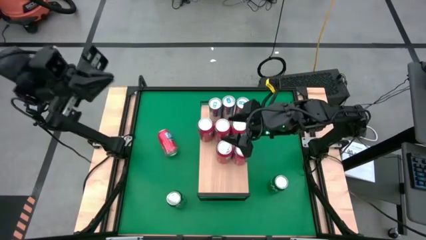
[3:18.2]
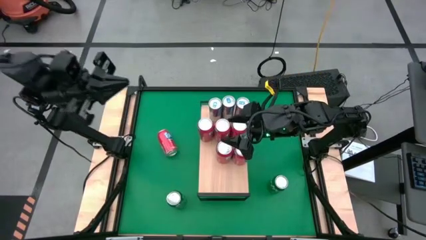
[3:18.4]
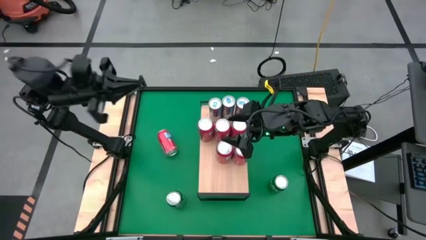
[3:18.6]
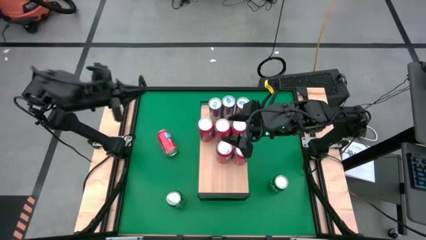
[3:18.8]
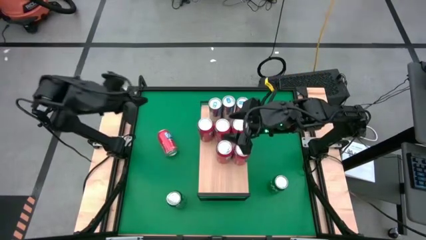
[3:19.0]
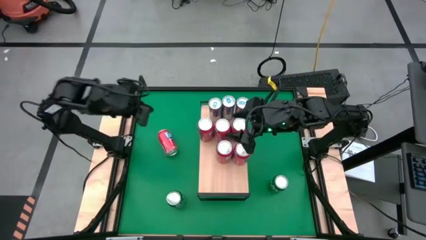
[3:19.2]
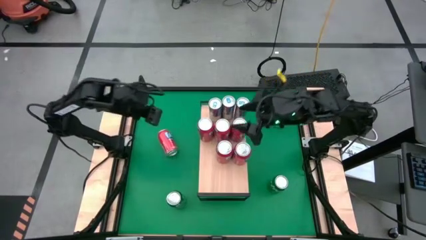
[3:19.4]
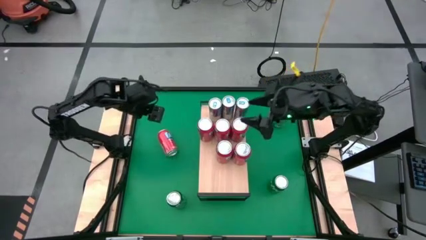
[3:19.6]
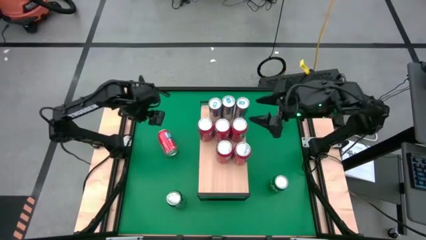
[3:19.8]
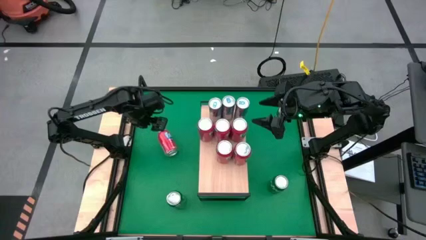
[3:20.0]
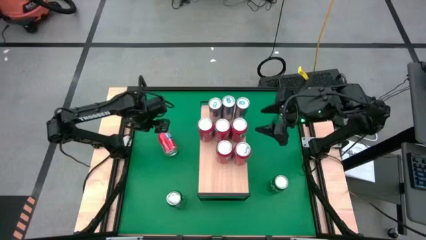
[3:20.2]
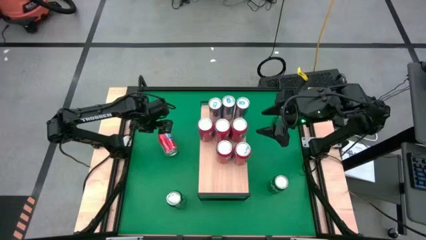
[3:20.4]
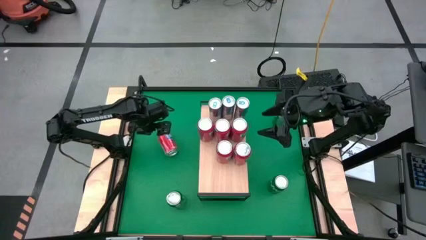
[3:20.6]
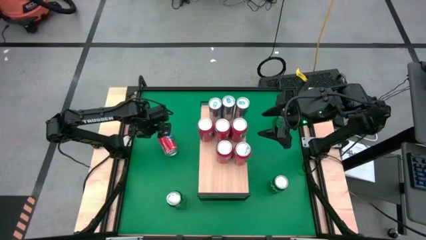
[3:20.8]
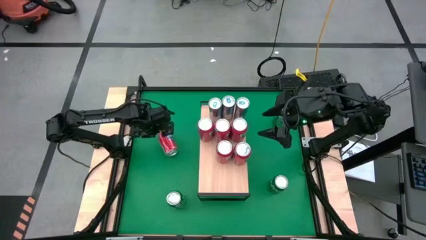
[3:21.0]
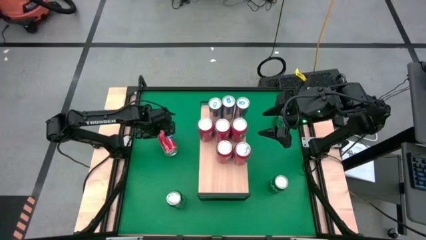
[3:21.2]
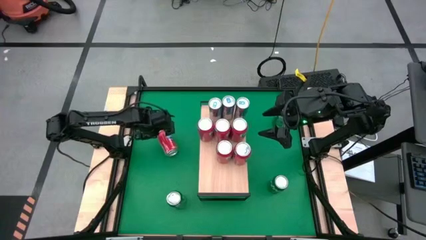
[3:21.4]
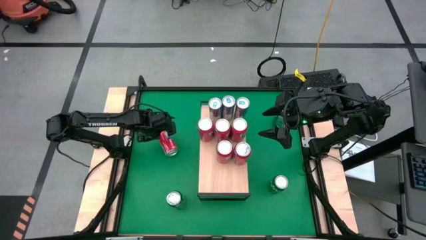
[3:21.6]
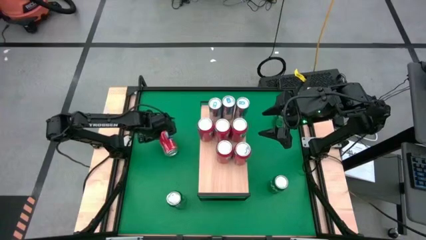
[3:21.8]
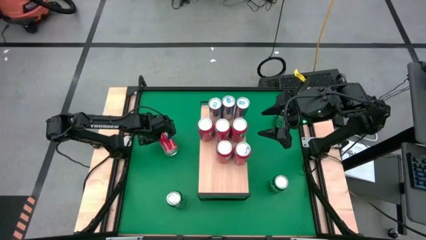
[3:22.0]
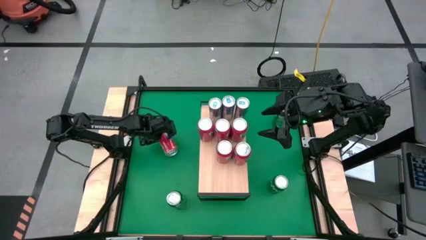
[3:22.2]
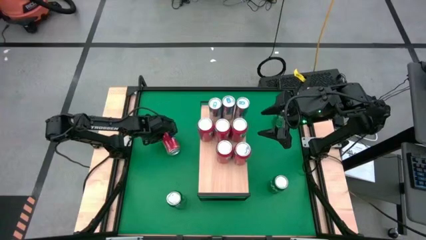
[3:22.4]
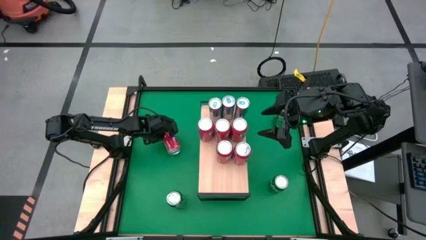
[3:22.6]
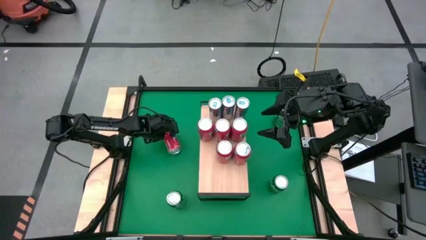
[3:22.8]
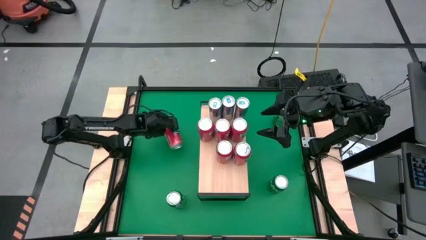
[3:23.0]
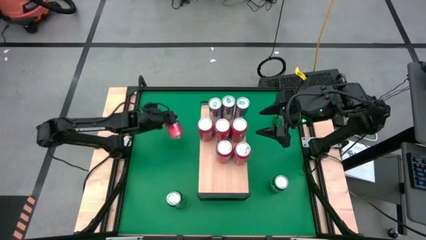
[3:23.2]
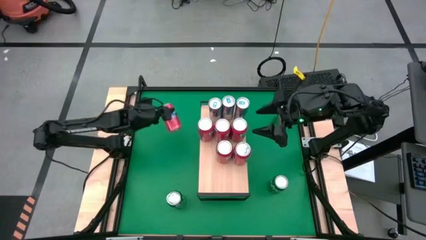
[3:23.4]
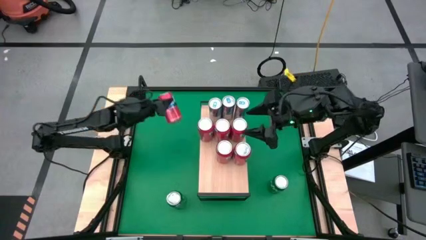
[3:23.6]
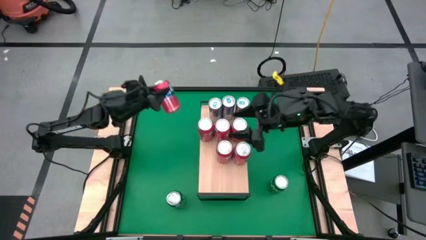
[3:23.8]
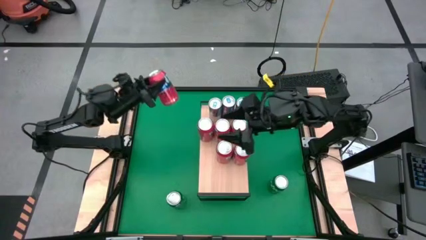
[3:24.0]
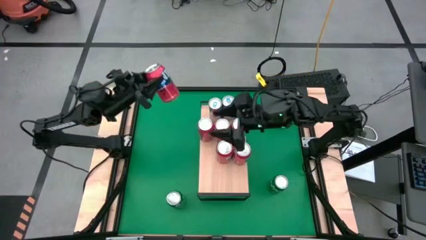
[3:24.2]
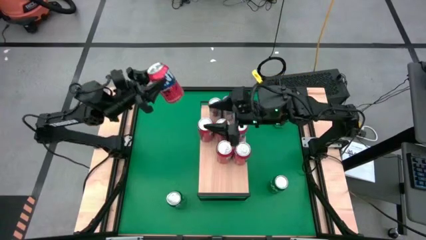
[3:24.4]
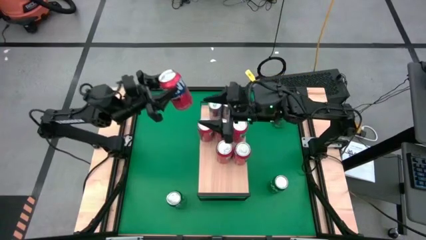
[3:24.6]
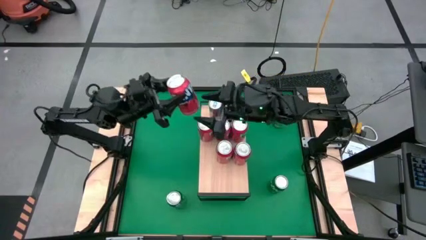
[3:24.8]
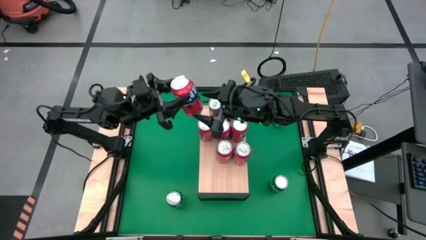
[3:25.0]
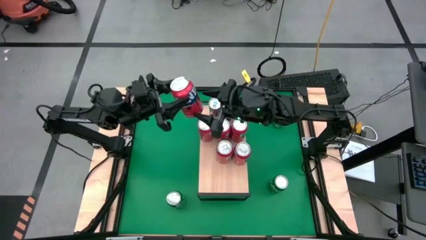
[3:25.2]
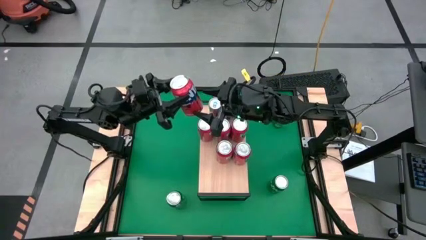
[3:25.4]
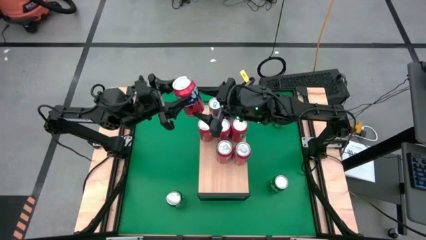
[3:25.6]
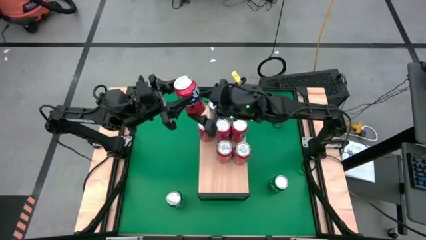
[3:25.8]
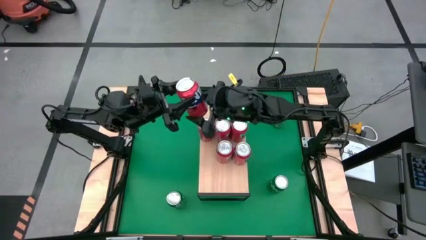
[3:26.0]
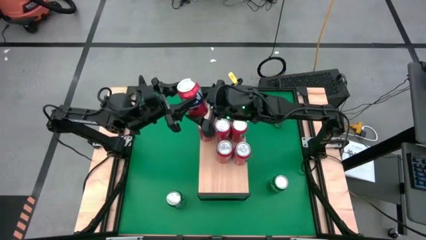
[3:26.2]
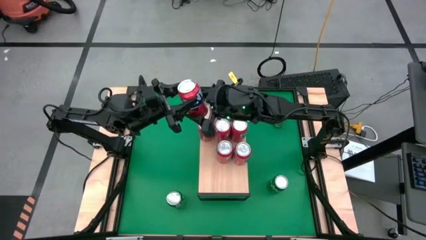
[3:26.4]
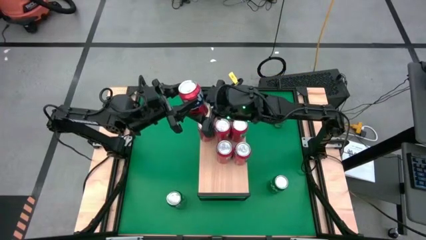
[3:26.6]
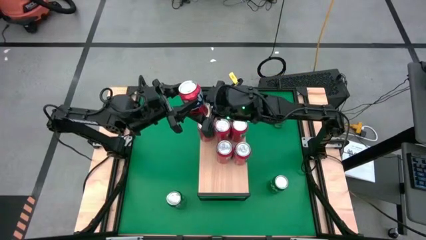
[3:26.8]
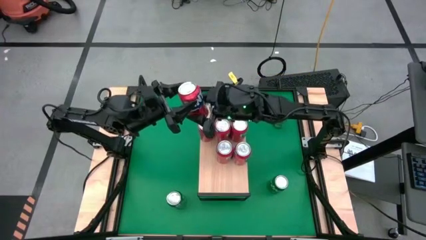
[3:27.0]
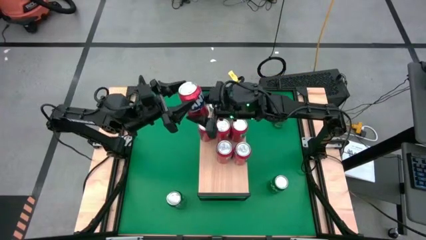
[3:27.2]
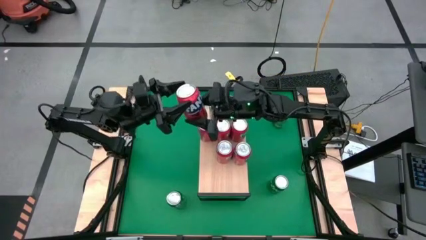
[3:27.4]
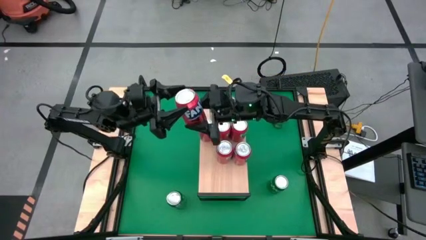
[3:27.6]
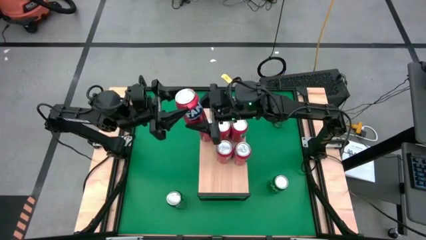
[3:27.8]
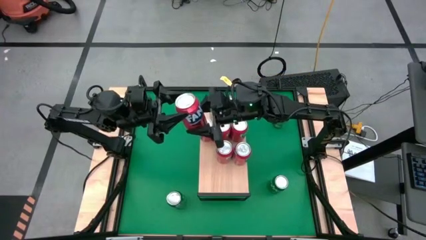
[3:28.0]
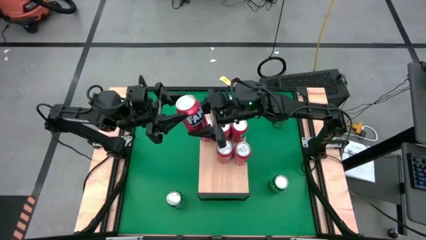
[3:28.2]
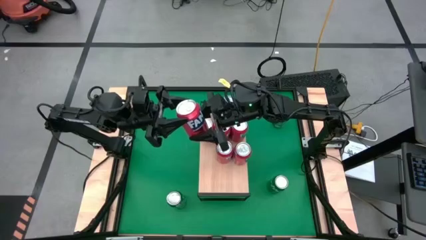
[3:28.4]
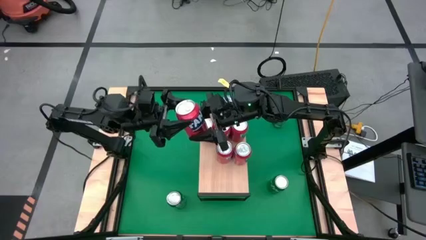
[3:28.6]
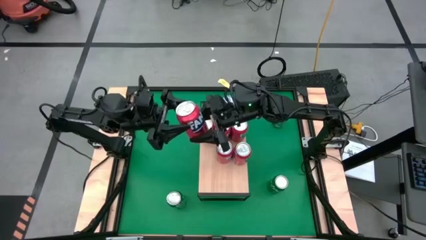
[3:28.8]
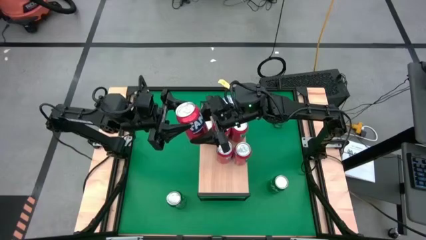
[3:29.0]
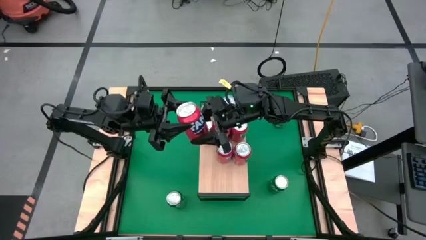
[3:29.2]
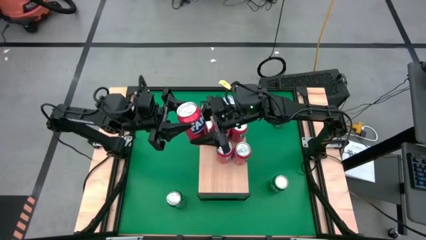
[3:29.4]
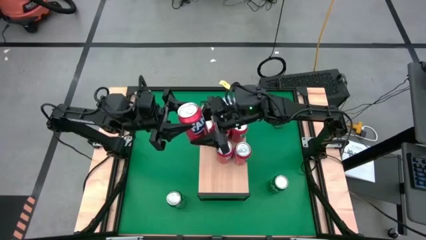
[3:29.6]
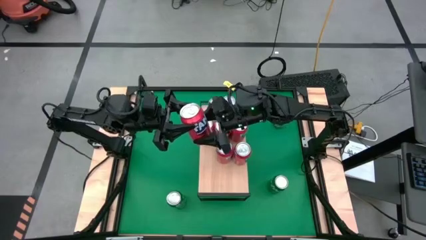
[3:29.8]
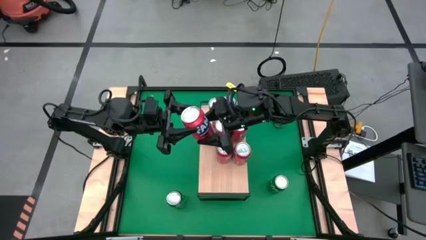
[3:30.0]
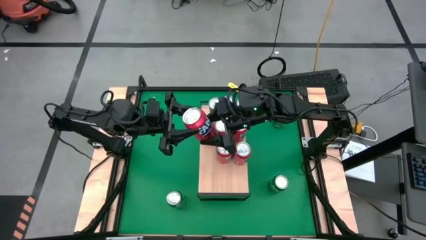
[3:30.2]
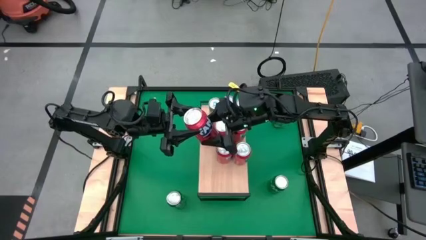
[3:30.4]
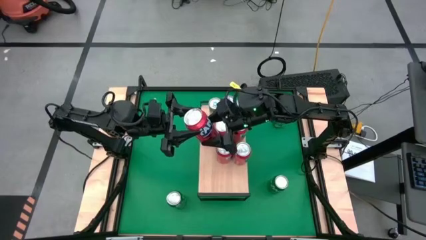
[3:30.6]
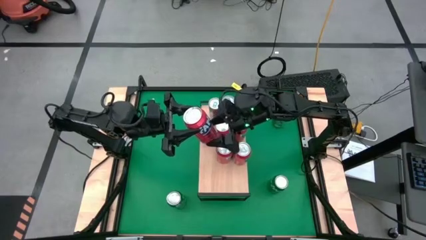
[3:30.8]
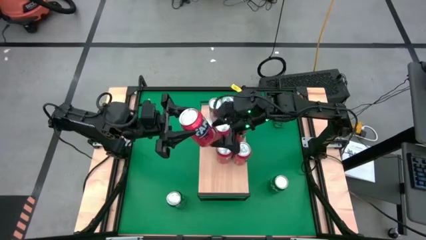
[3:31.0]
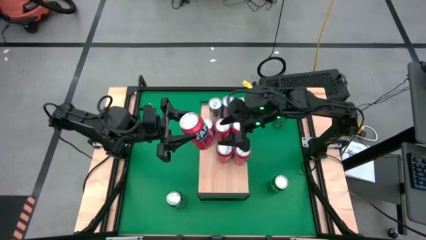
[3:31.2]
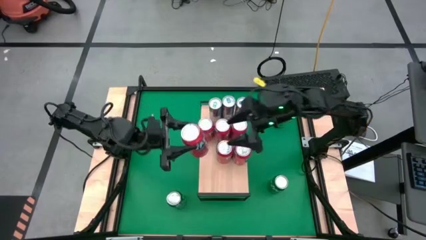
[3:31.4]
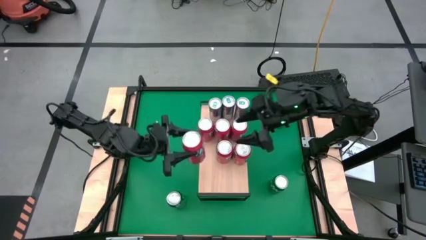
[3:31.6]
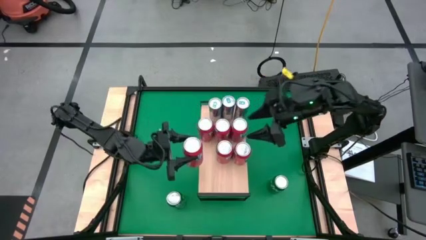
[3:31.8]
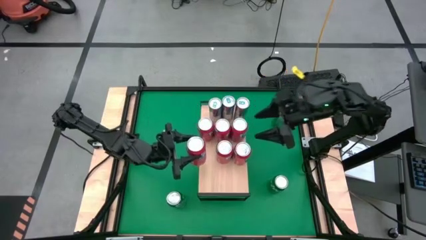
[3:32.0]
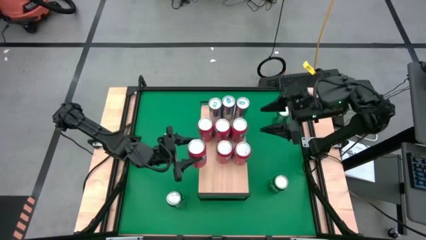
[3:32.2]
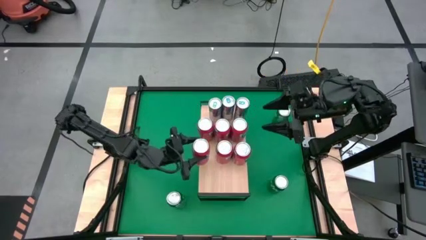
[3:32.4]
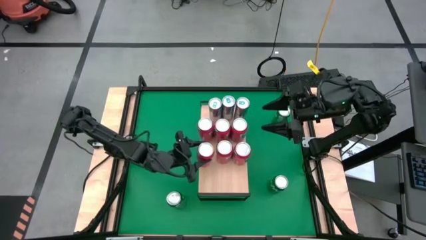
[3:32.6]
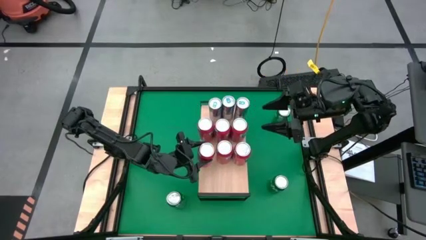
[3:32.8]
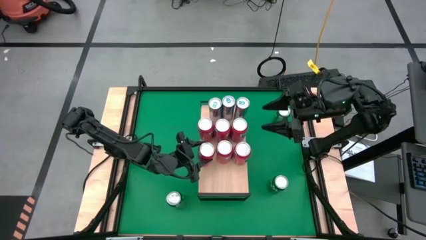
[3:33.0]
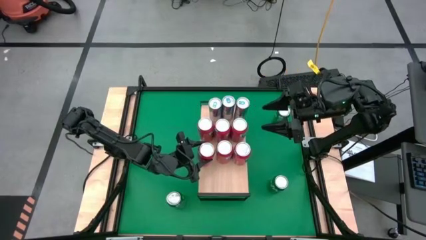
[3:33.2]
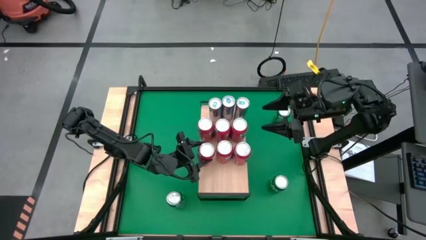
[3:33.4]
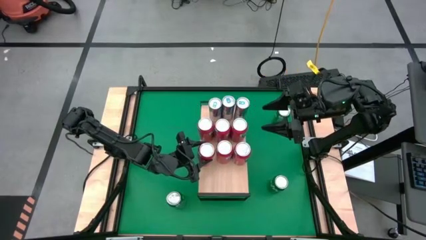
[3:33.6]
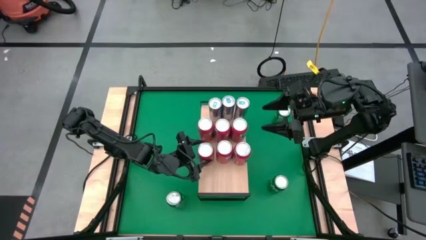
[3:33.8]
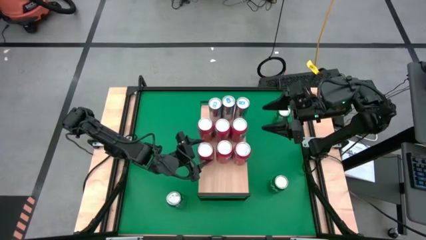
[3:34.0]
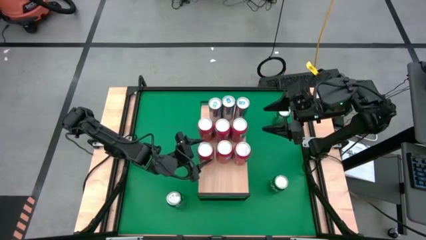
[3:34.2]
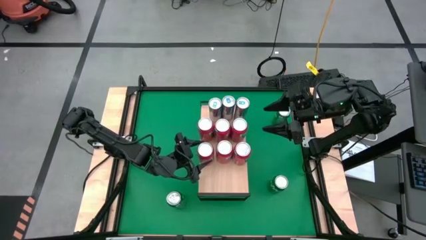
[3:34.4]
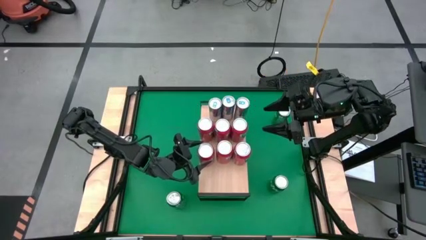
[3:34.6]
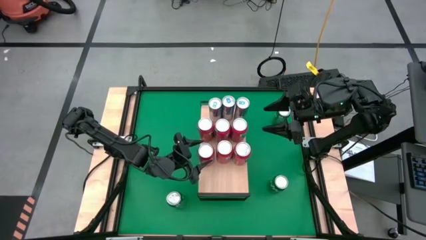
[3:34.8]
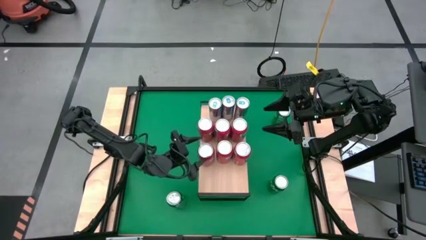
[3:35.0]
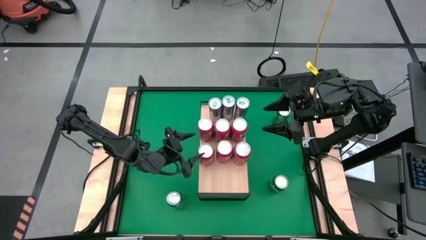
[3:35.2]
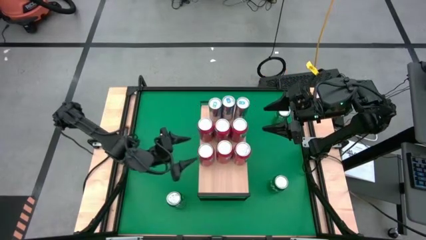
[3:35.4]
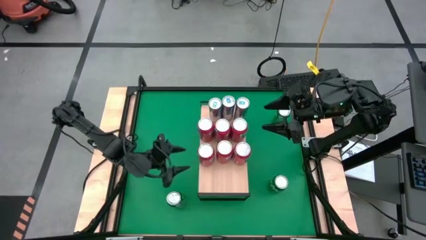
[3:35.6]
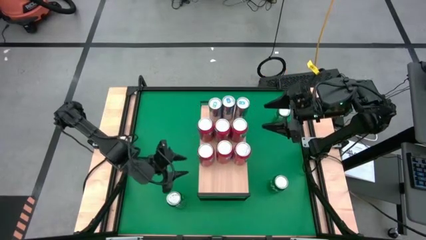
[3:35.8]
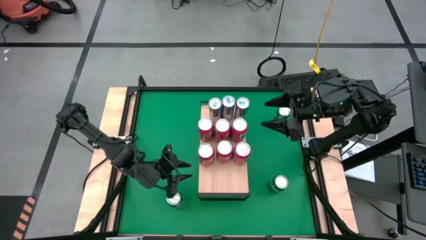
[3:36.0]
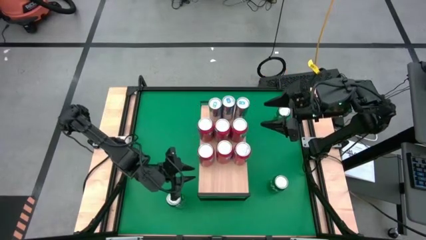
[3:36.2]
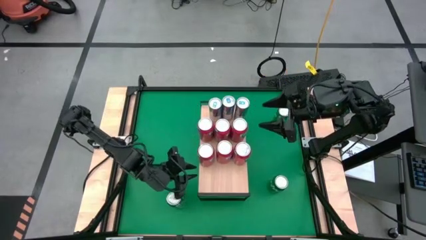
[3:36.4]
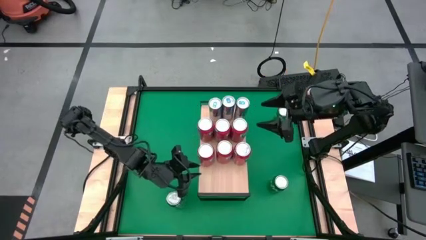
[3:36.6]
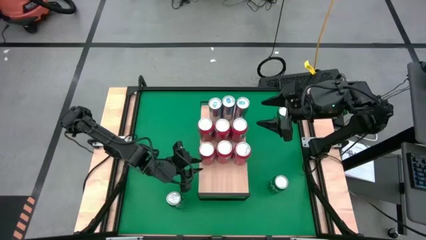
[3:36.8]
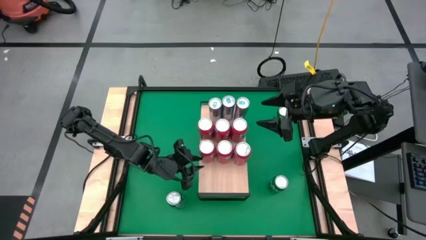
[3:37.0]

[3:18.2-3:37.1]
Task: Place canned beverage on shelf
Put the orange soda can on the shelf aligned with the other orange soda cans
